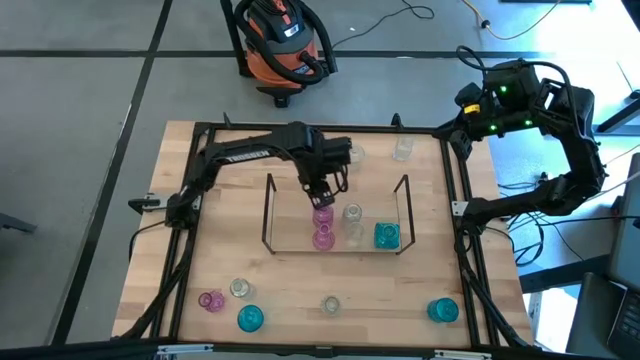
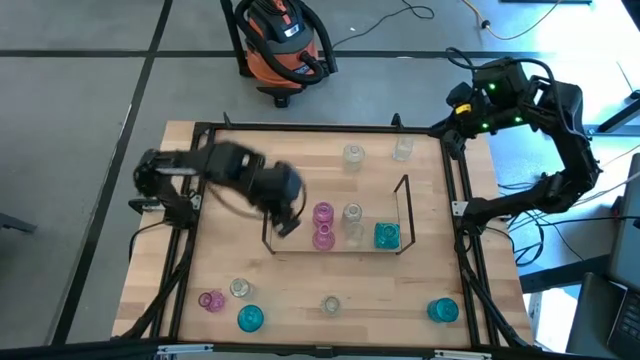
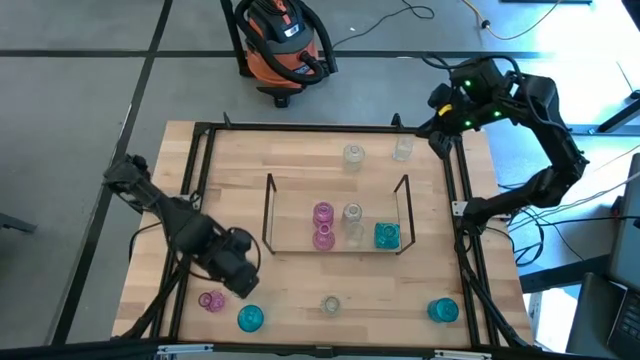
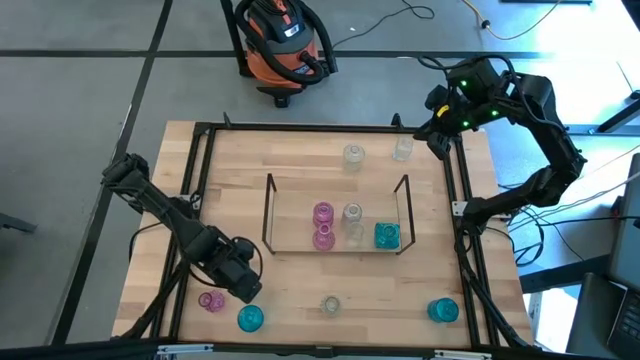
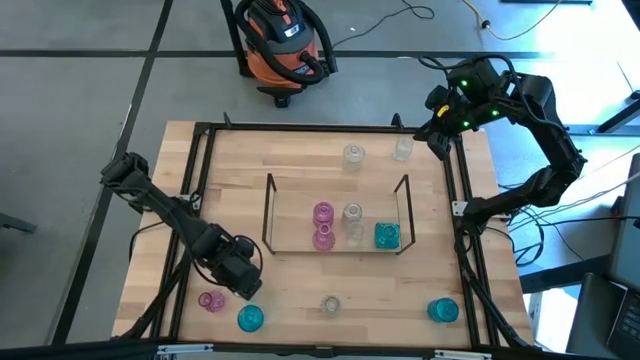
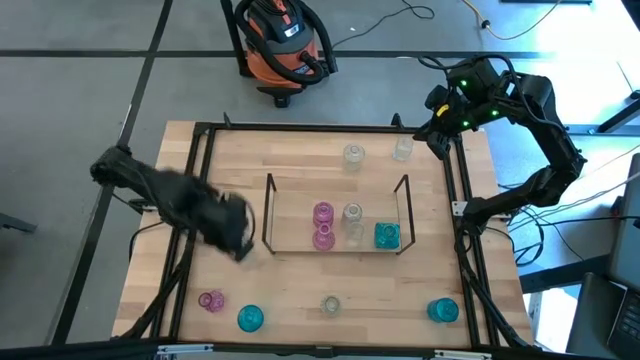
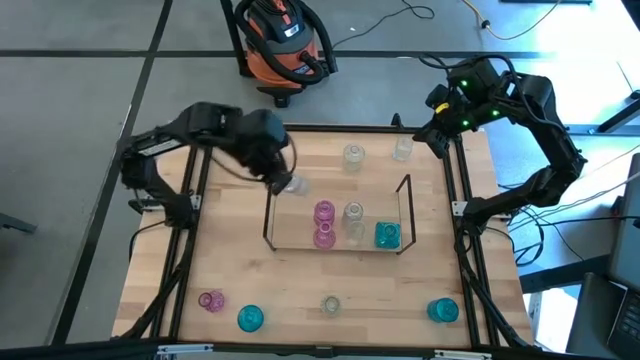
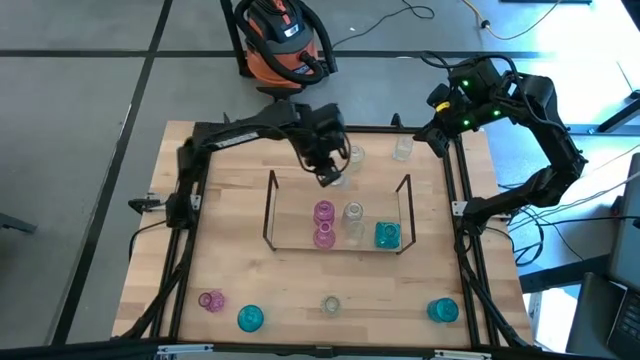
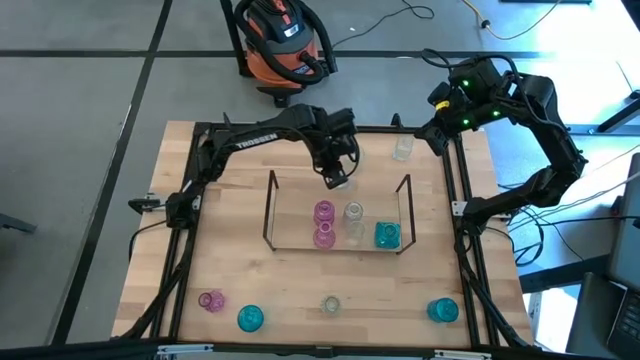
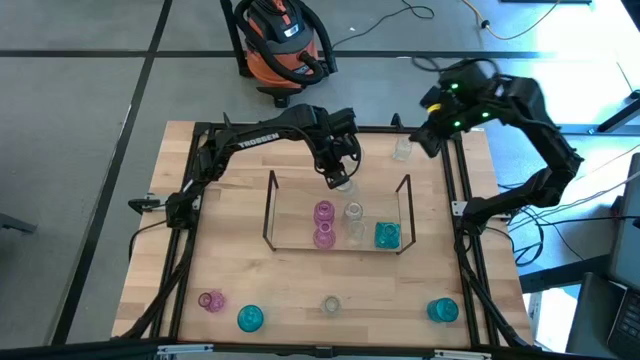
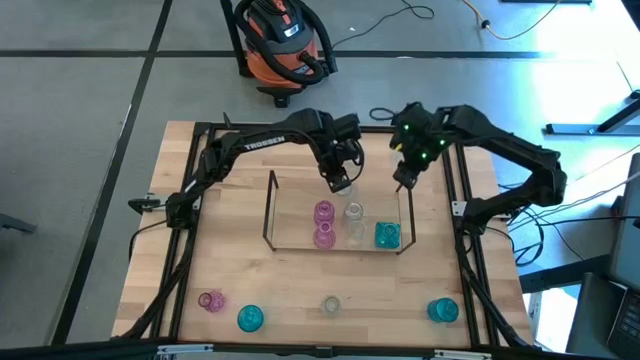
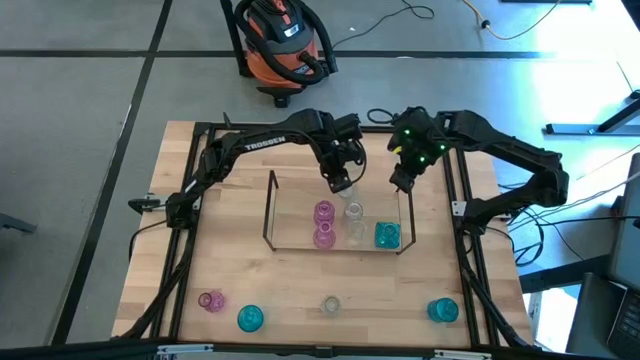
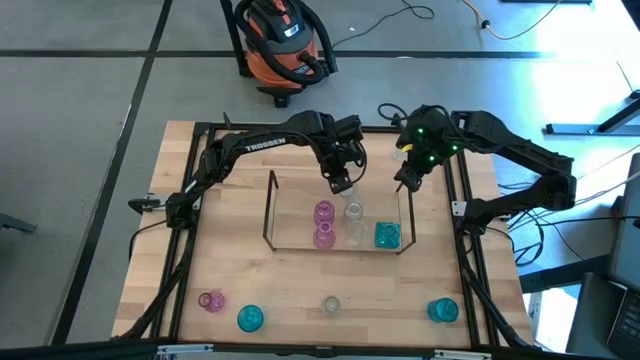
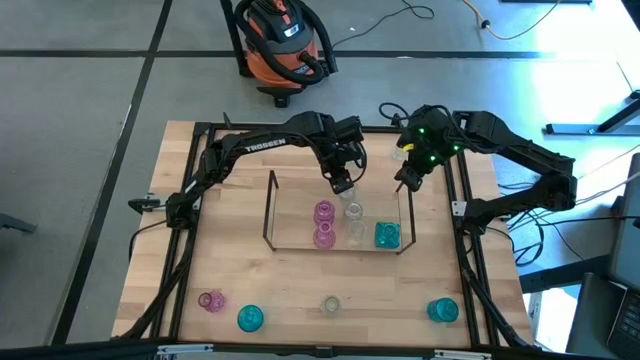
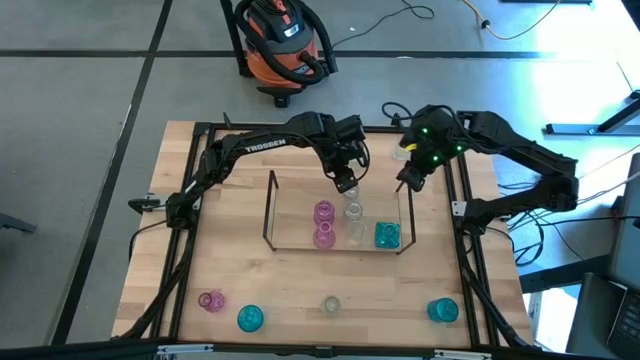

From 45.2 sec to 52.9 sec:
Task: sort vases onto shelf
Put the transparent vase aligned with the other transparent vase on the shelf

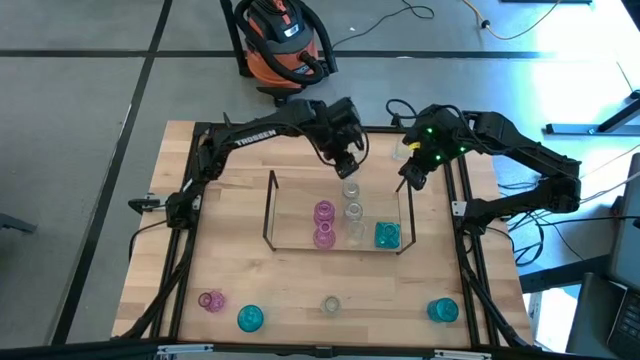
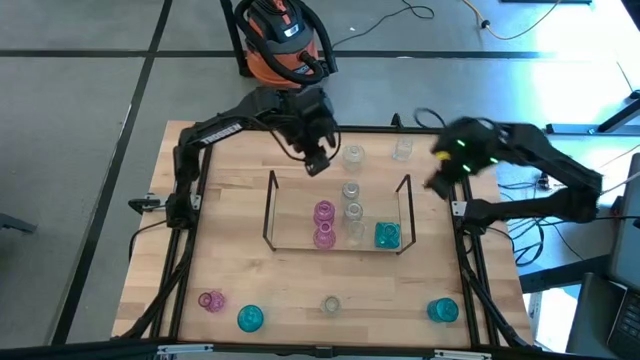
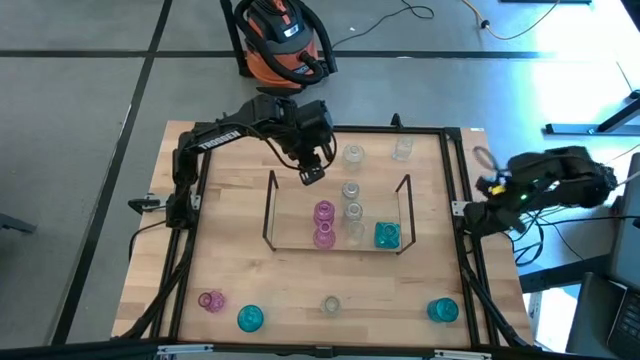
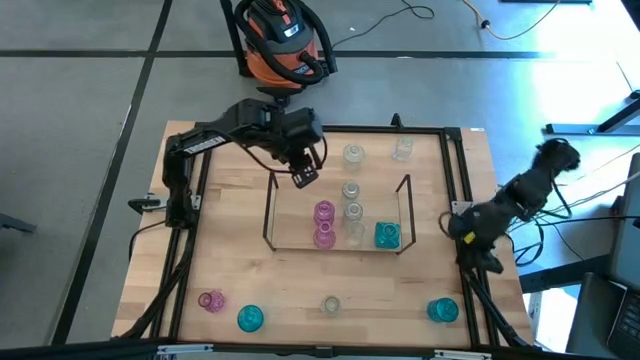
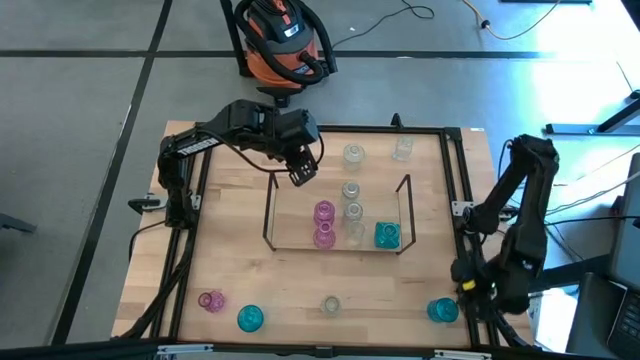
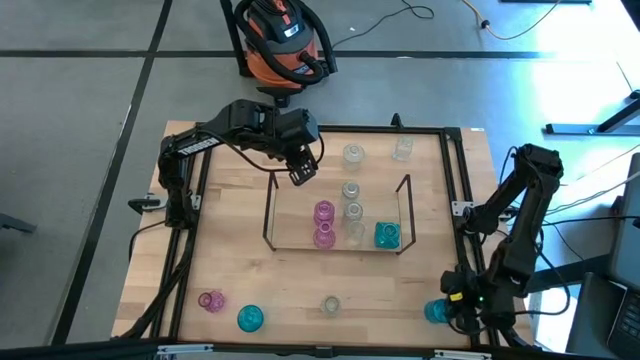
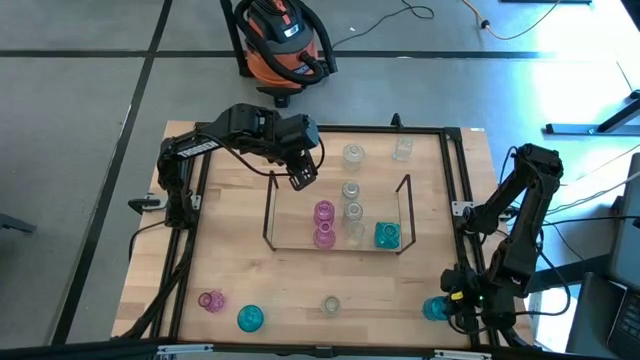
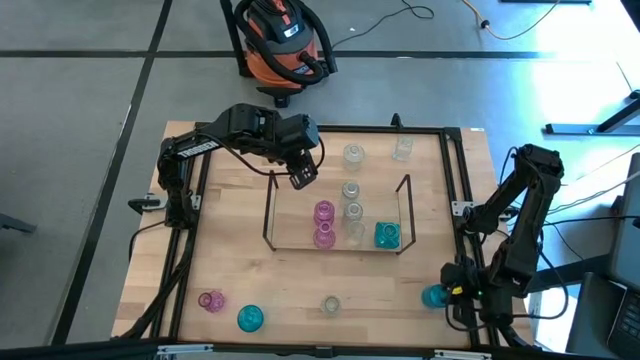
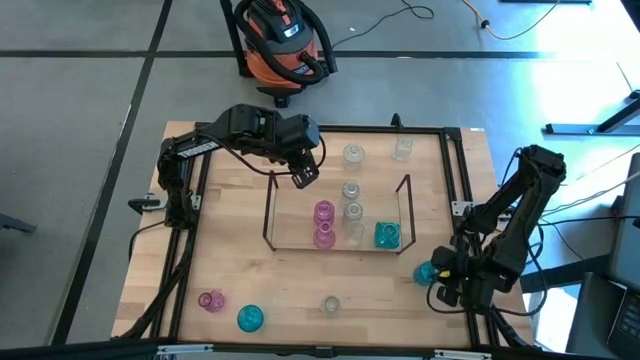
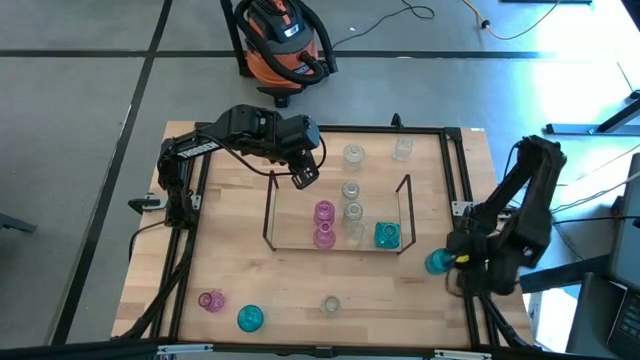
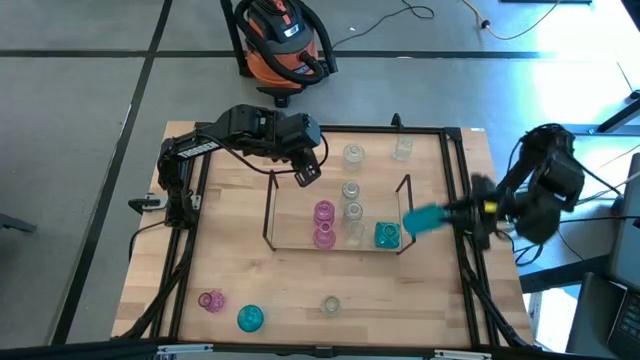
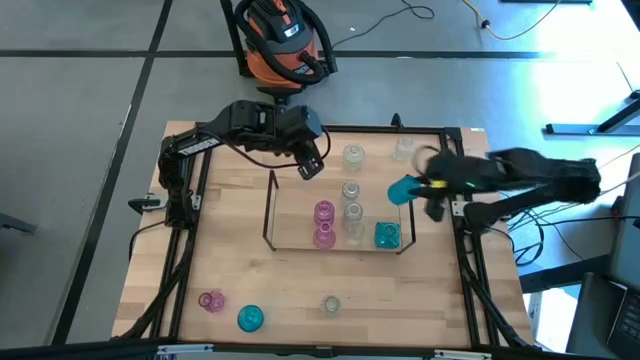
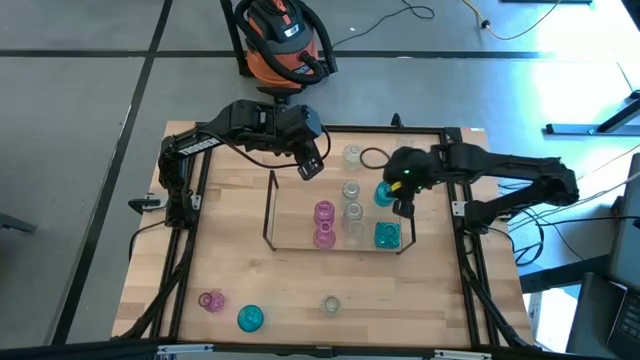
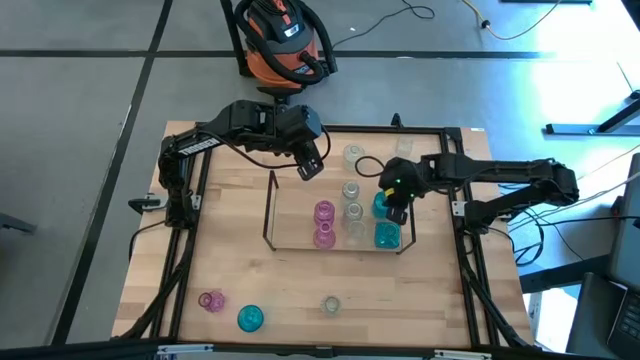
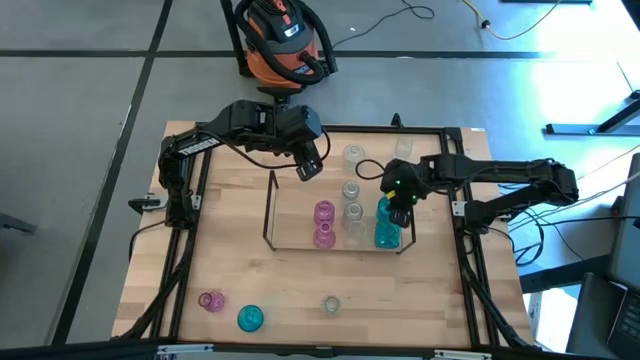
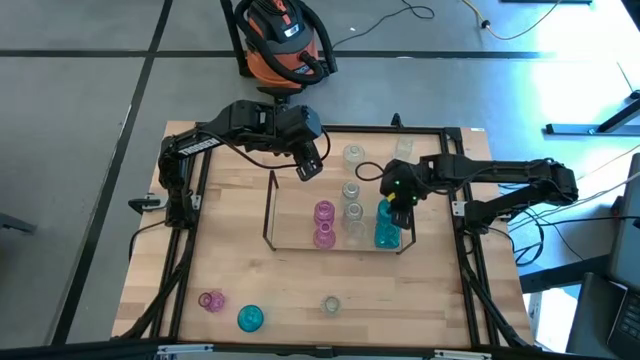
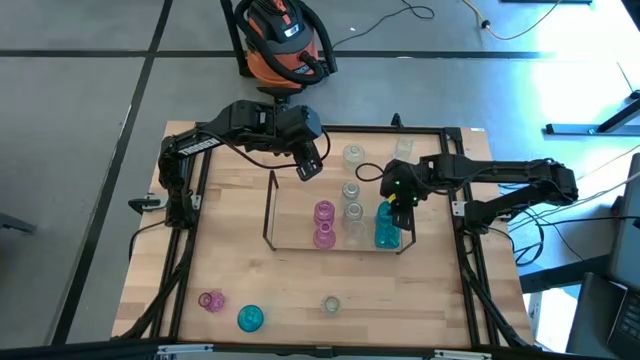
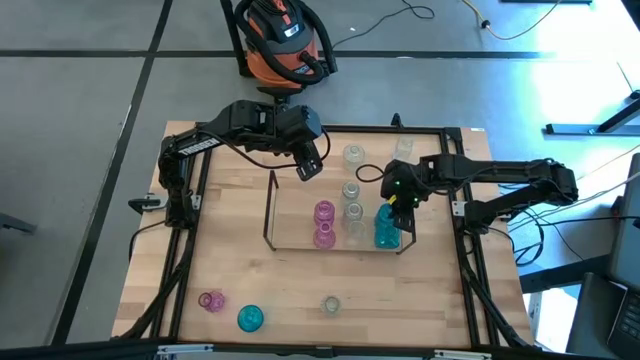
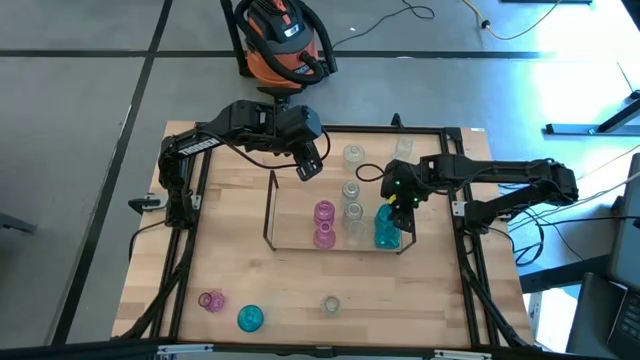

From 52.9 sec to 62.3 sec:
Put the blue vase aligned with the other blue vase on the shelf

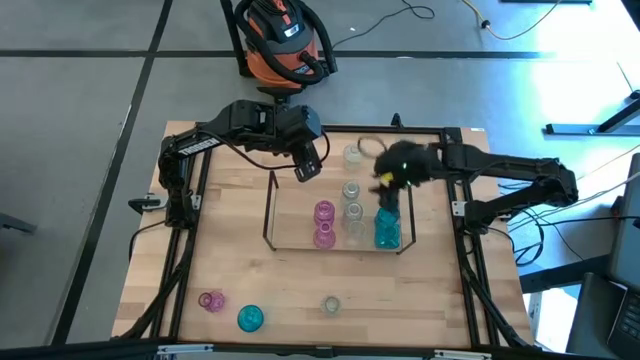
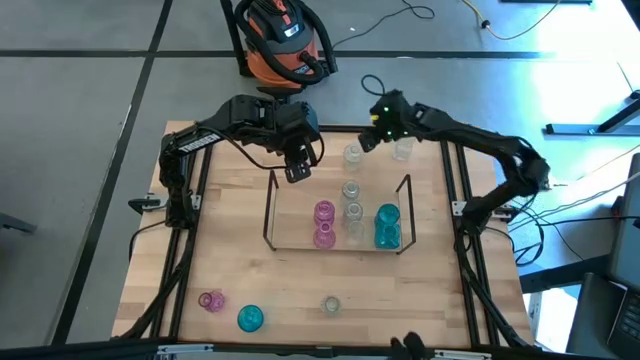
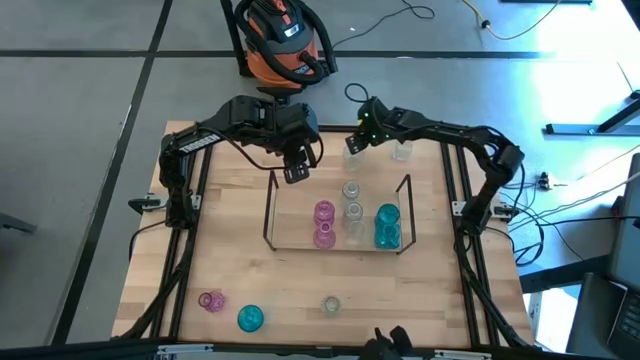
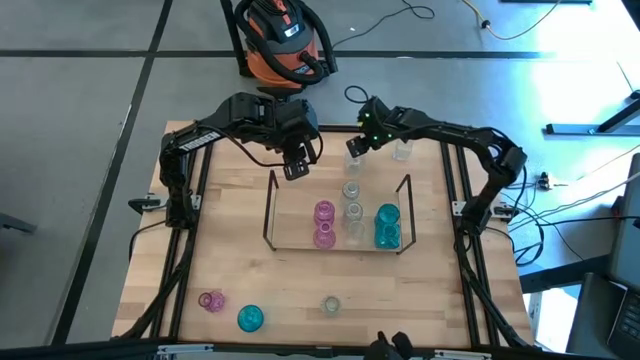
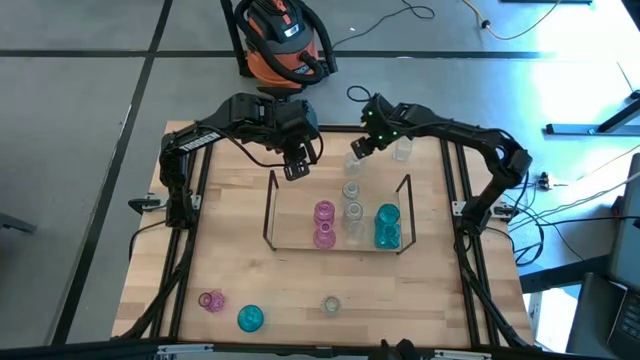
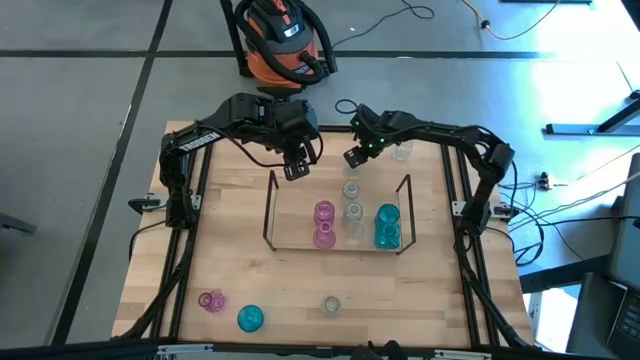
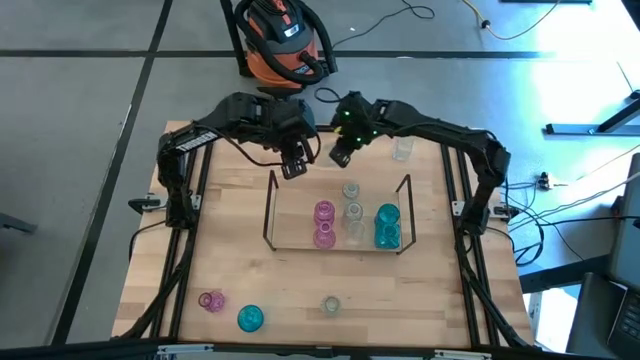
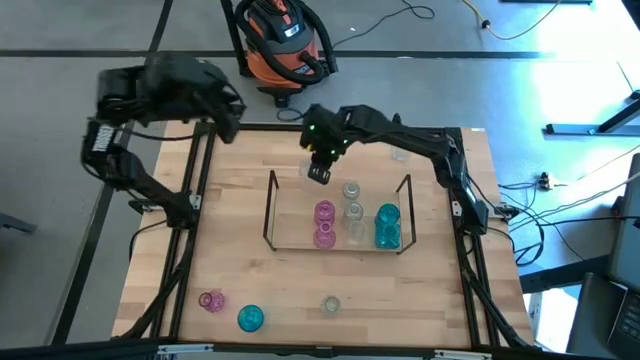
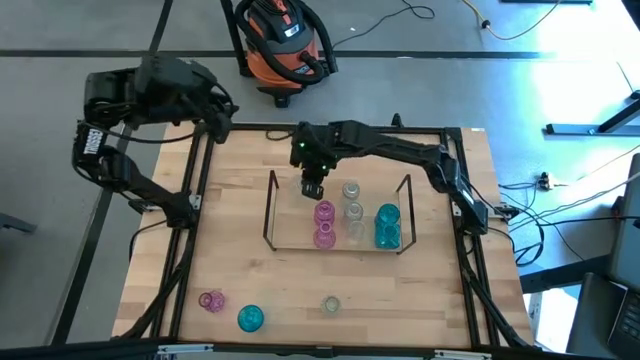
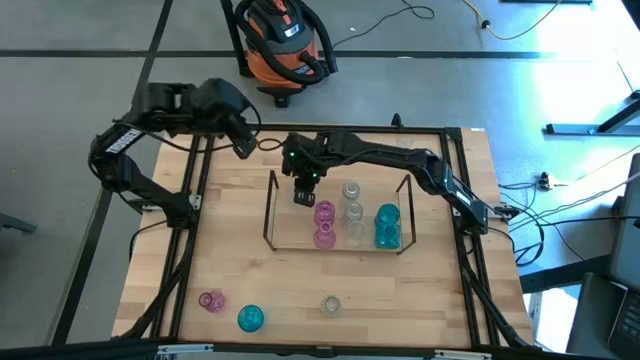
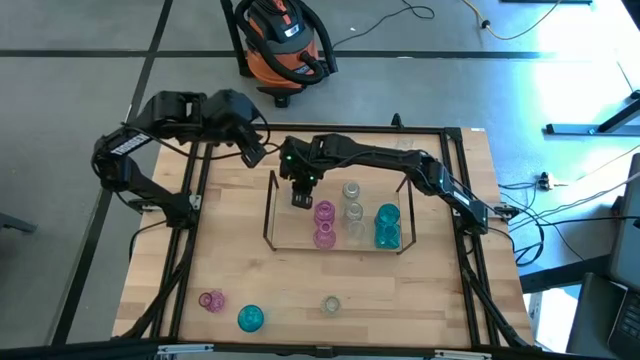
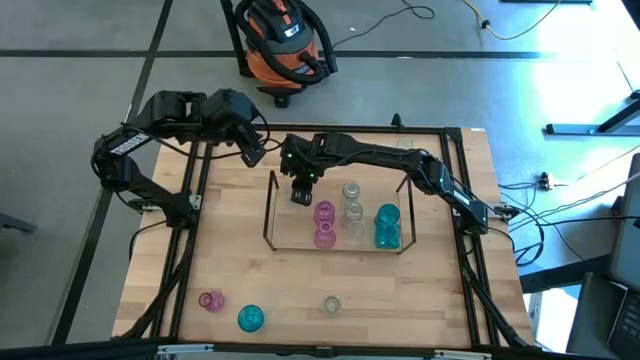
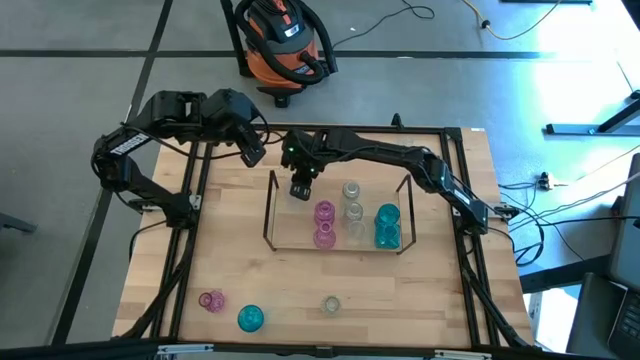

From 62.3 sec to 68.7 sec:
Put the transparent vase
